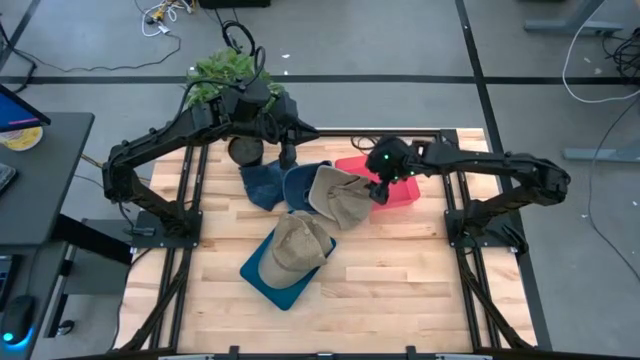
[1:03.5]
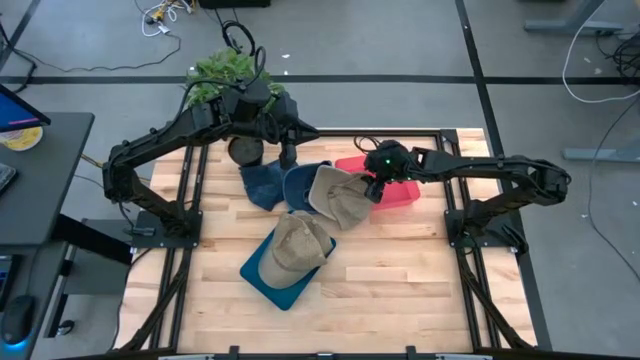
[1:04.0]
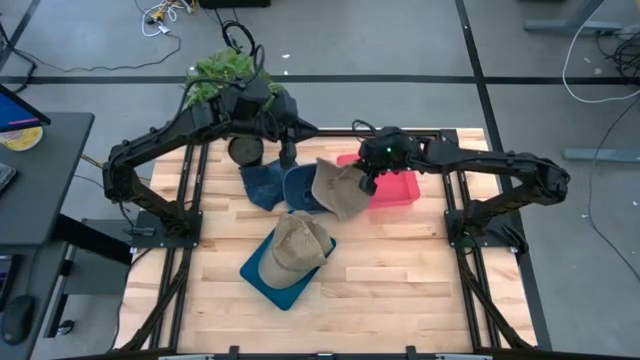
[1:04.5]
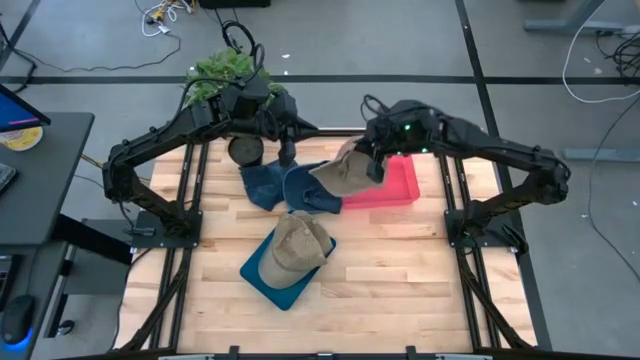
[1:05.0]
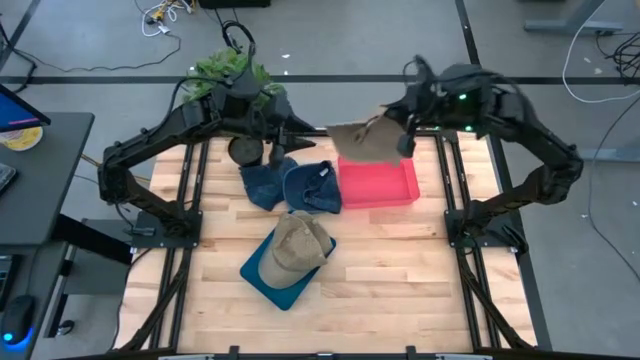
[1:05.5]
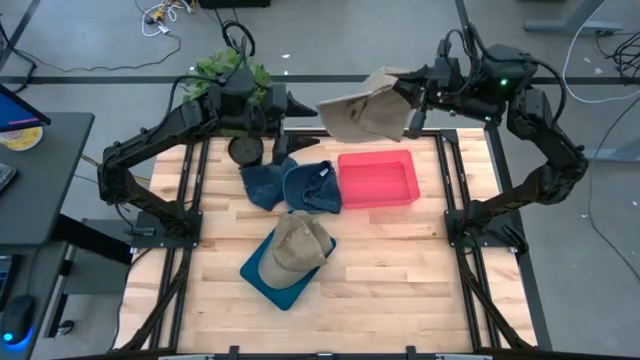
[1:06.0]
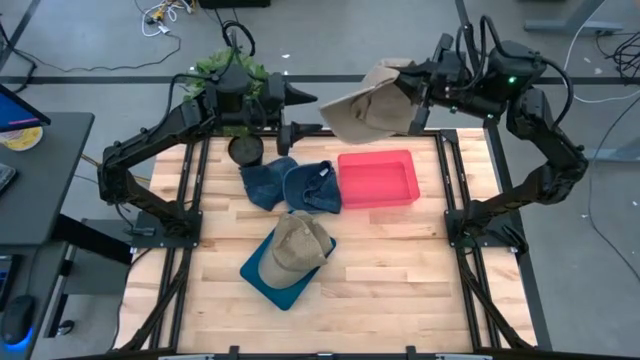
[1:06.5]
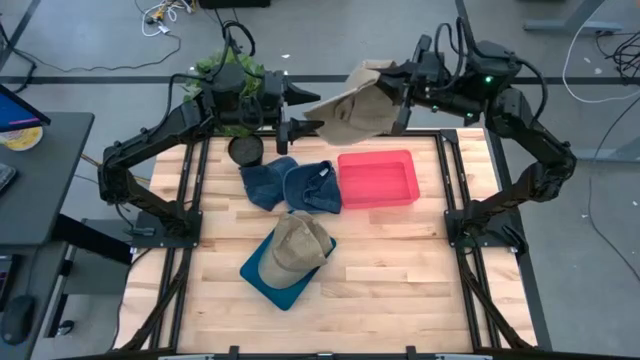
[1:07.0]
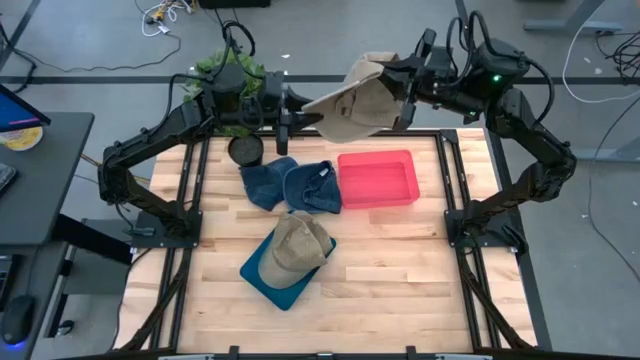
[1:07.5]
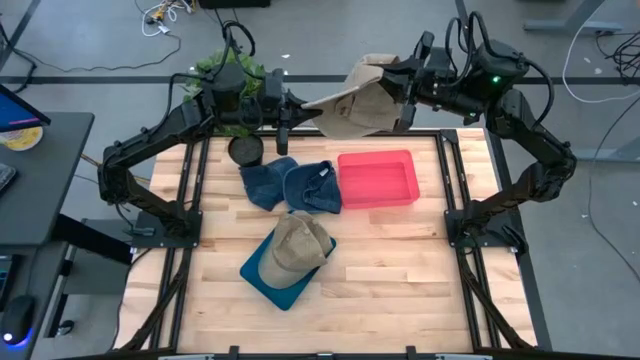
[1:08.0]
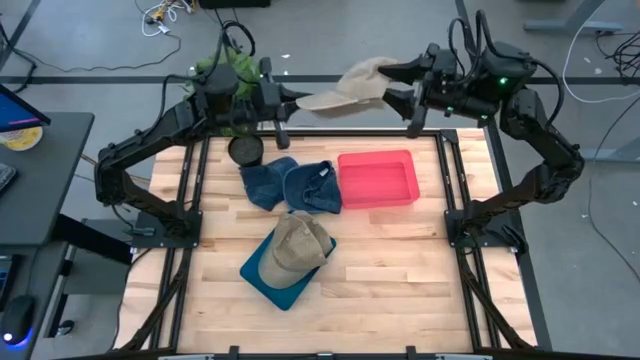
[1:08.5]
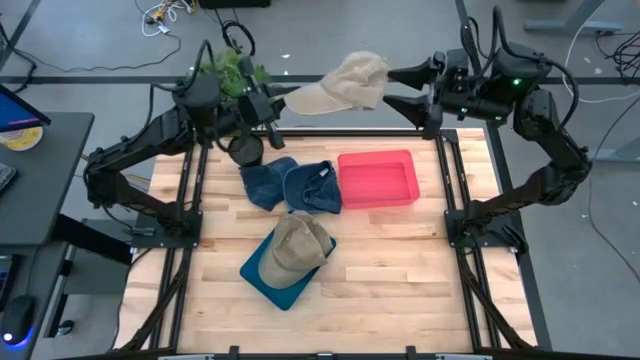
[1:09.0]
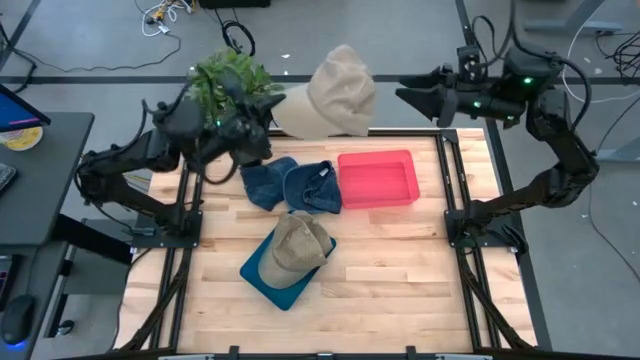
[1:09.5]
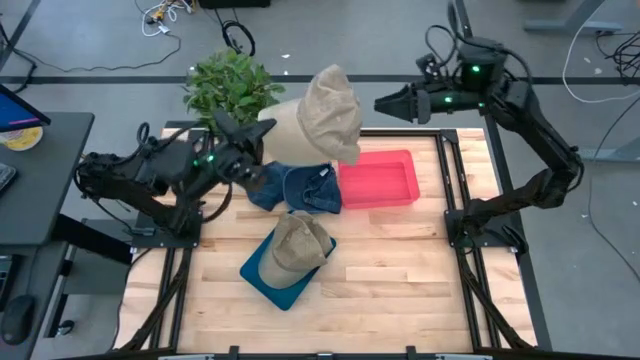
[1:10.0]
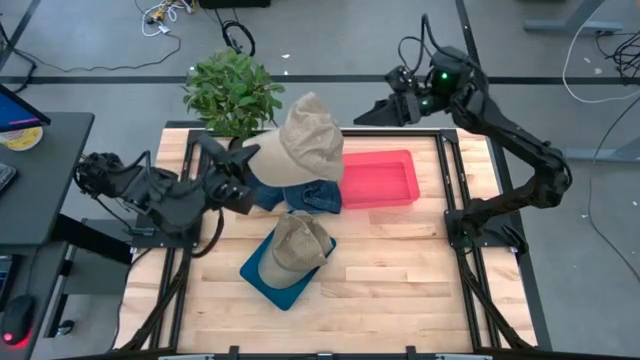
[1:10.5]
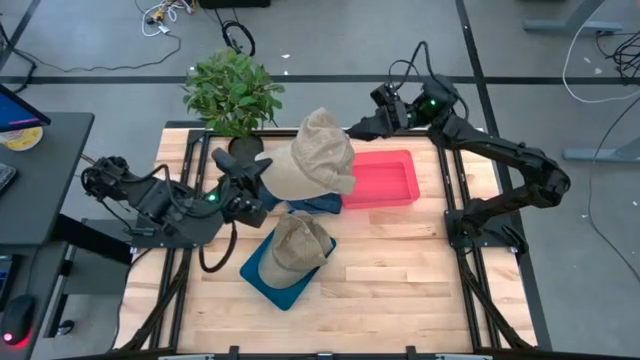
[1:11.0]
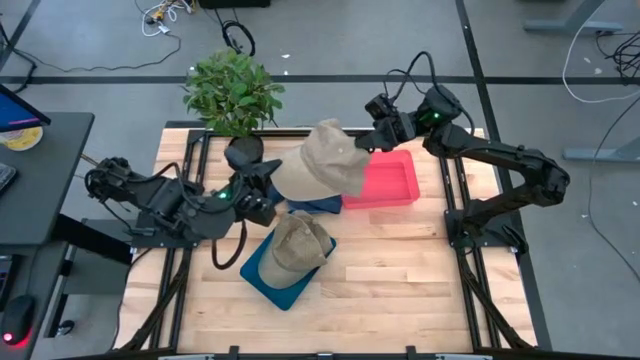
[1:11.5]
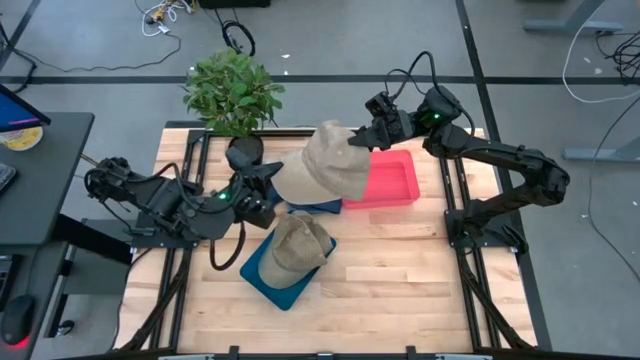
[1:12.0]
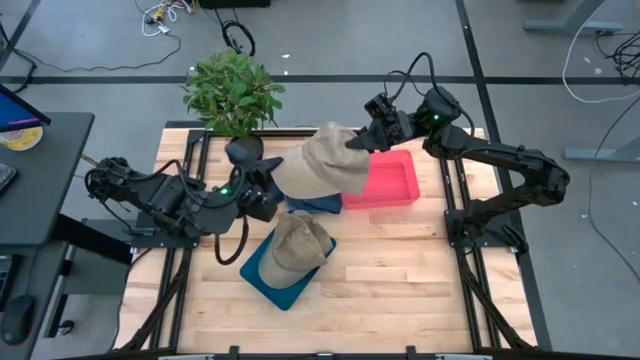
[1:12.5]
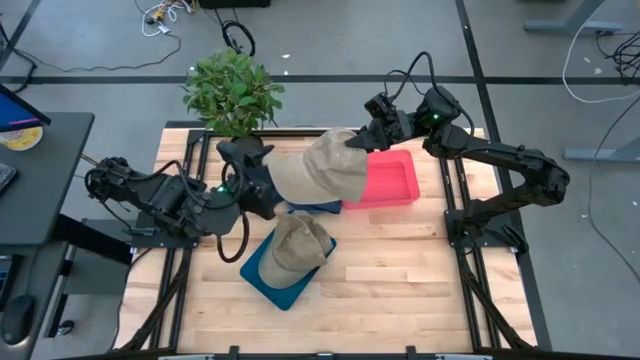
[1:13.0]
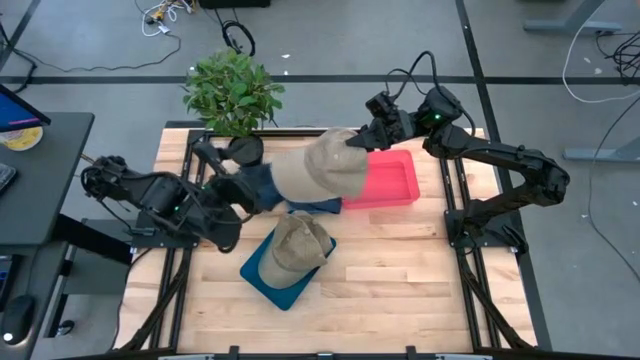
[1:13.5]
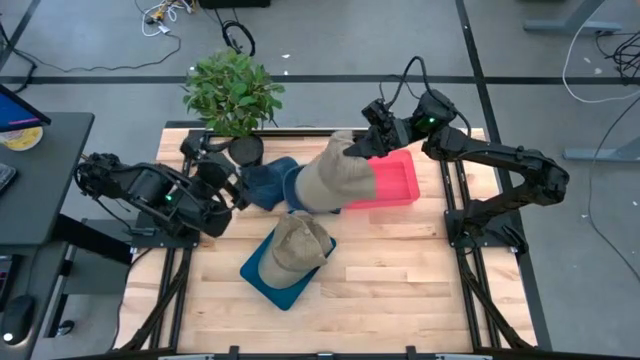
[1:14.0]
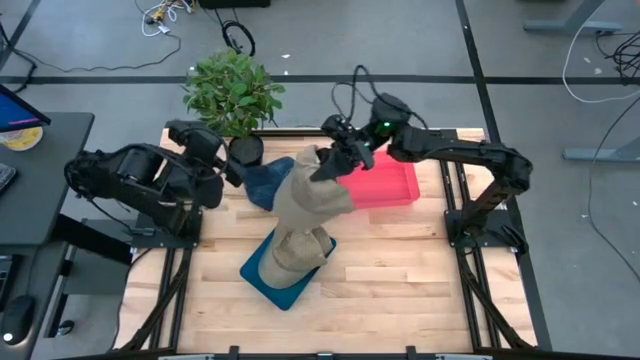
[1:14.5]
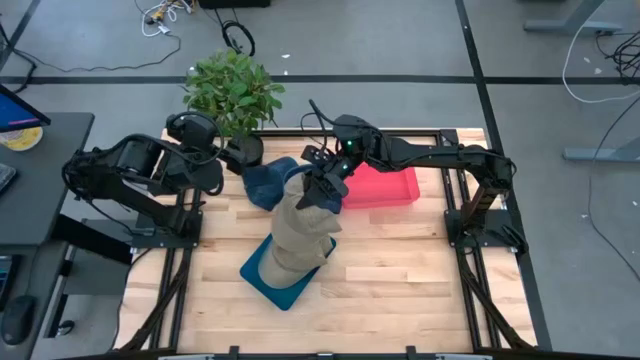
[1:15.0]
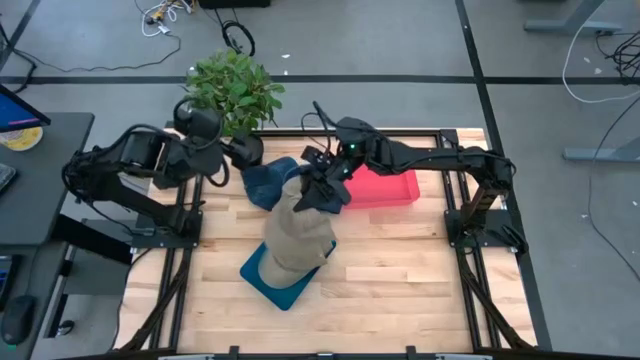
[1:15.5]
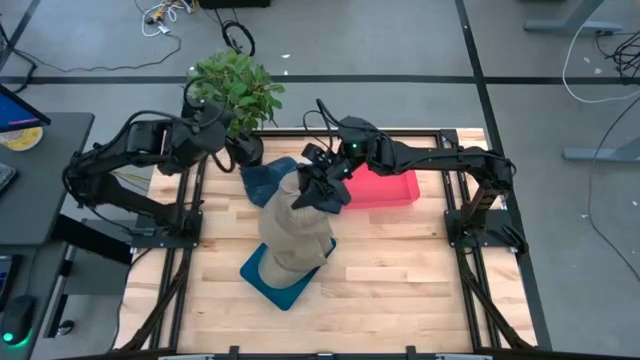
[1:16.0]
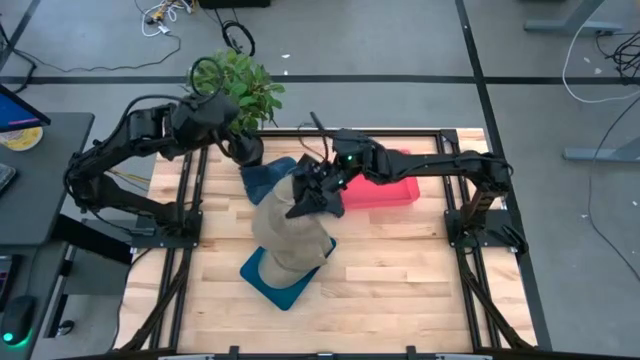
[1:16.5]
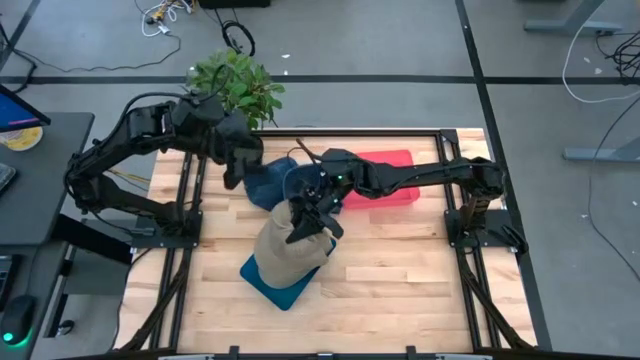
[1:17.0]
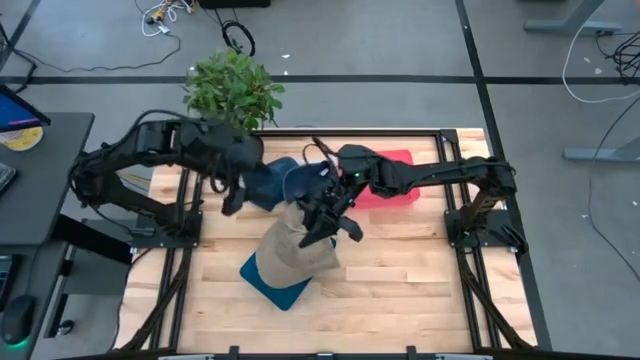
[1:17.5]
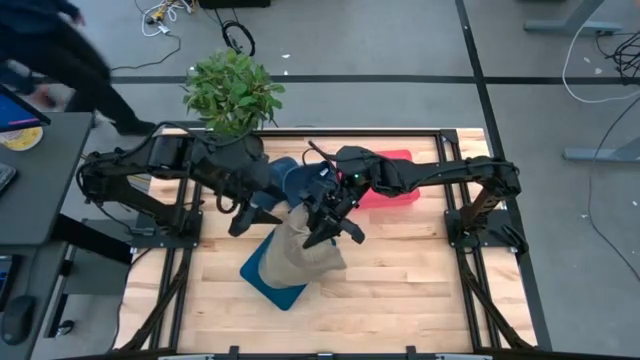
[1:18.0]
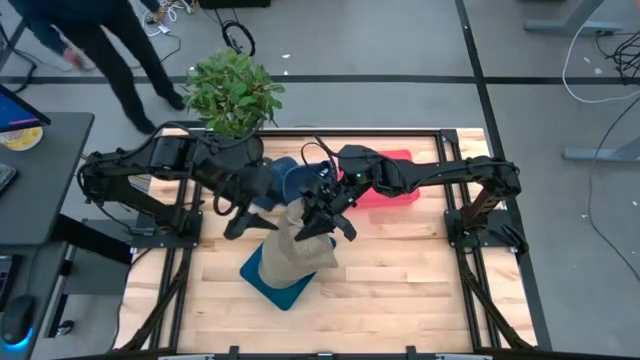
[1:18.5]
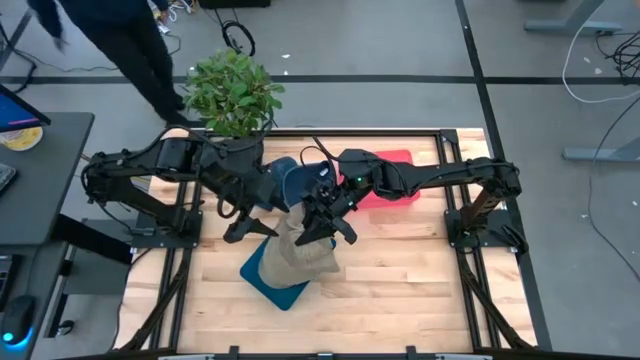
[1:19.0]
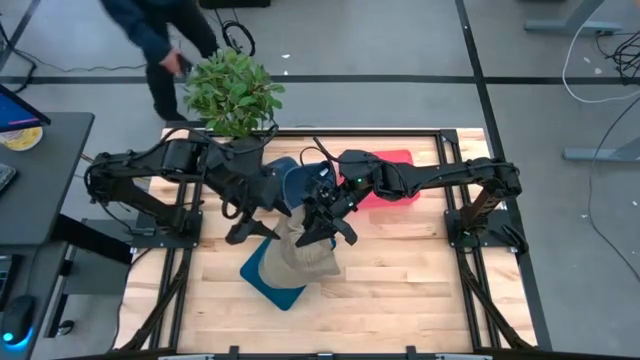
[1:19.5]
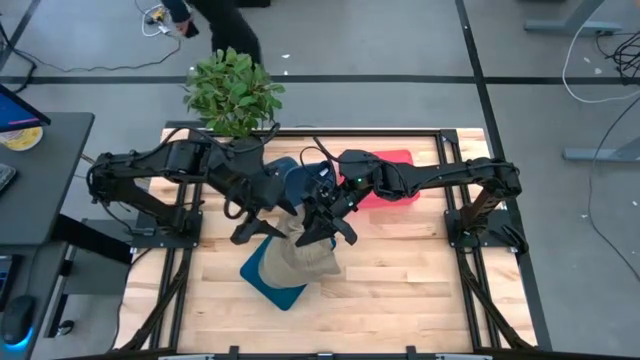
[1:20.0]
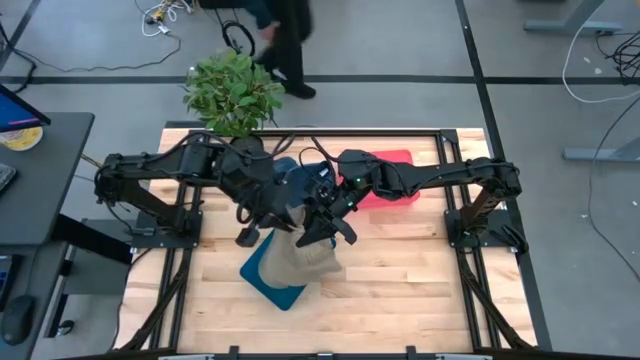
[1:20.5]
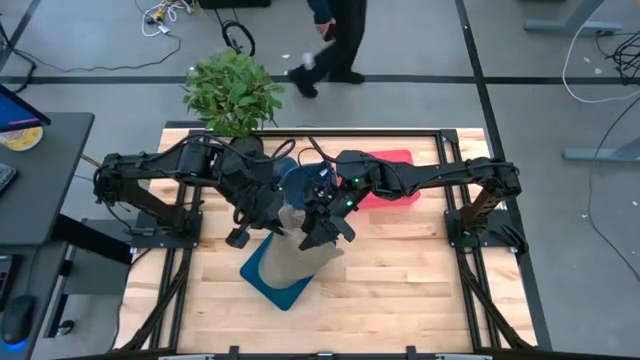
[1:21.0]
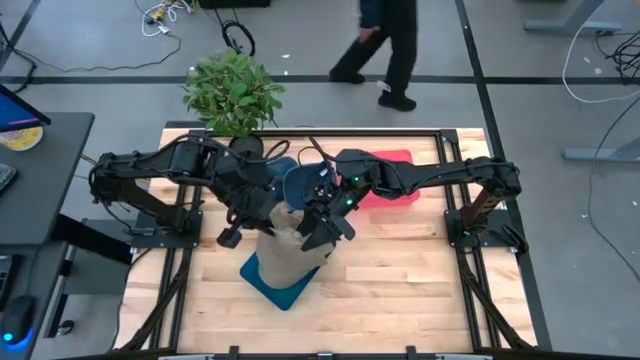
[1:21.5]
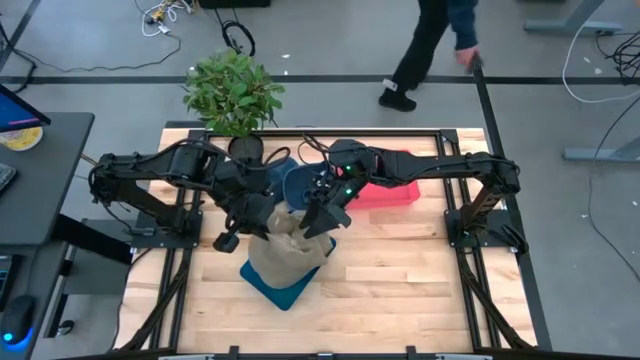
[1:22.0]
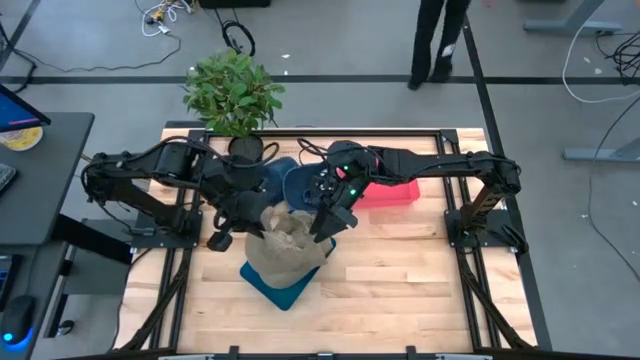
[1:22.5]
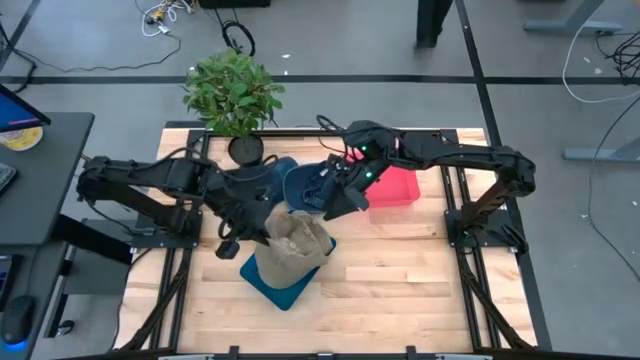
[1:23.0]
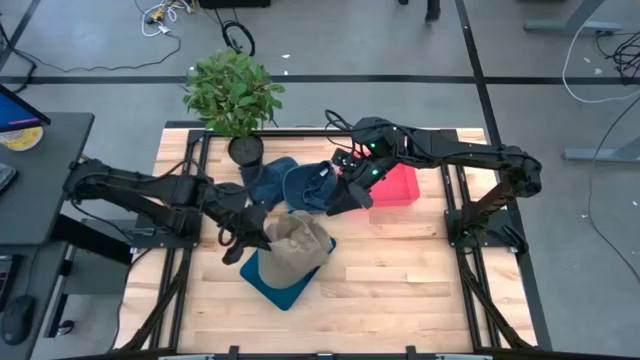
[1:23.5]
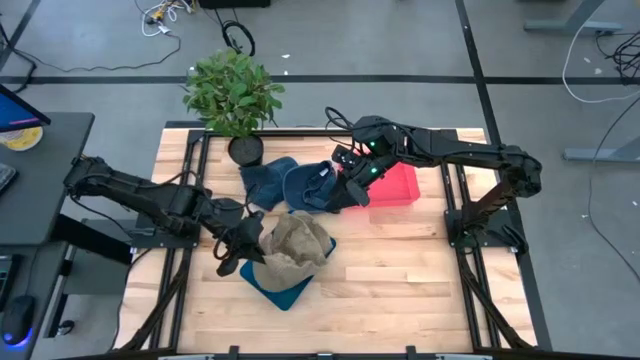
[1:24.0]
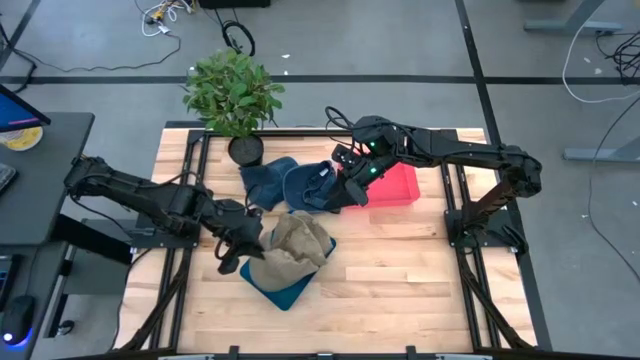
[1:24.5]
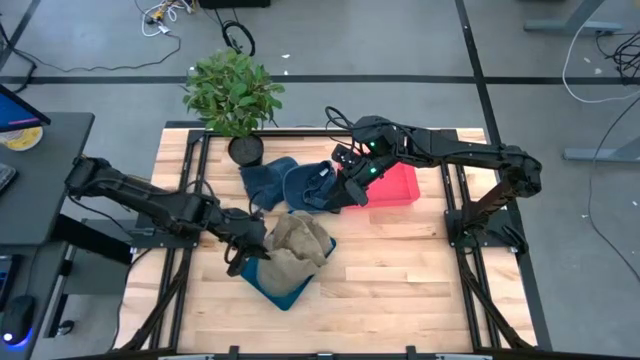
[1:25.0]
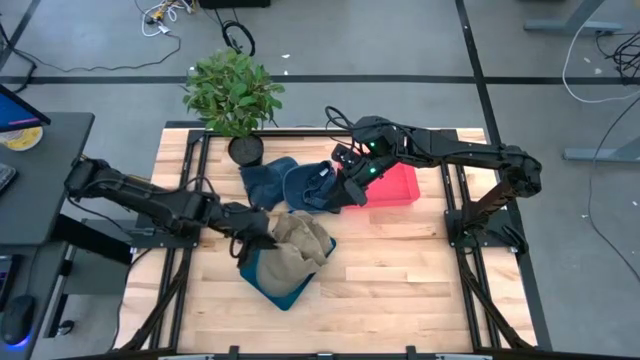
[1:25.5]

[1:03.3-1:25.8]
Task: Pick & Place hat
Put the brown cap into the blue bin
